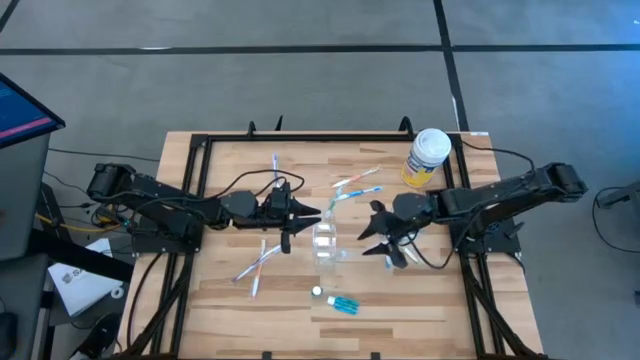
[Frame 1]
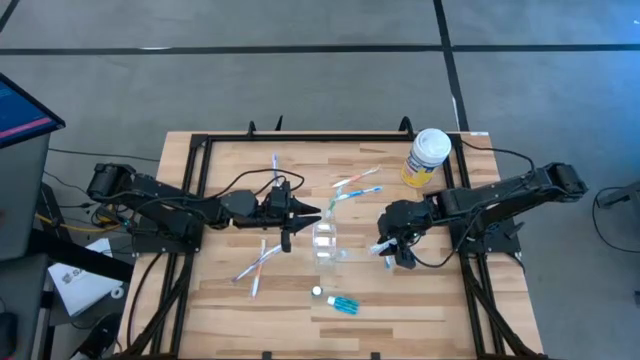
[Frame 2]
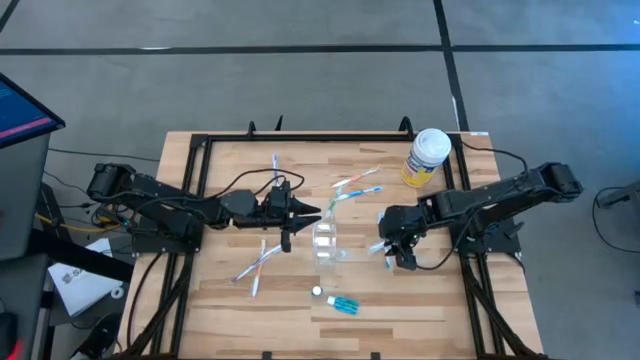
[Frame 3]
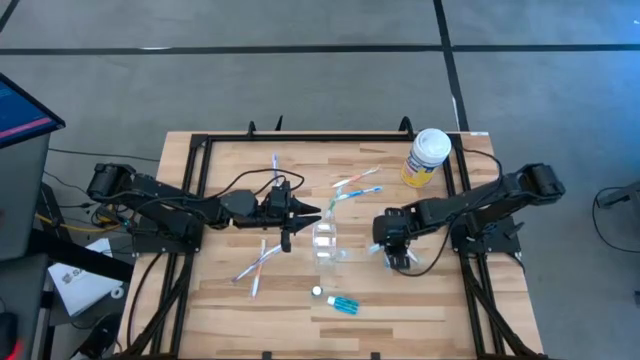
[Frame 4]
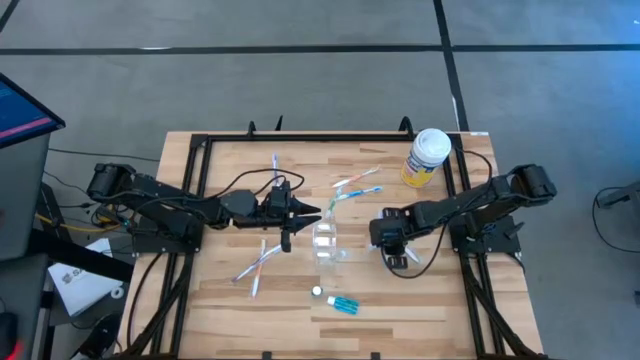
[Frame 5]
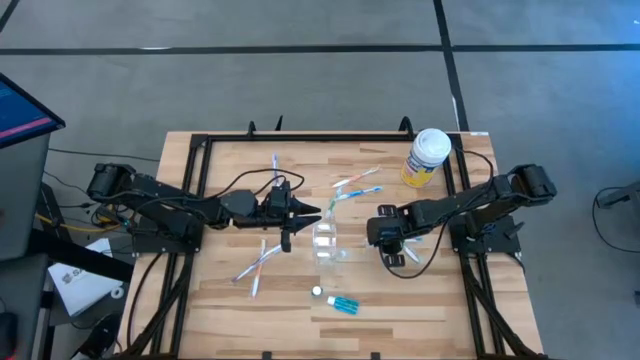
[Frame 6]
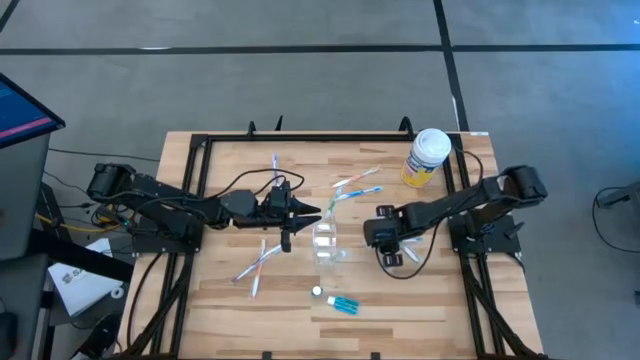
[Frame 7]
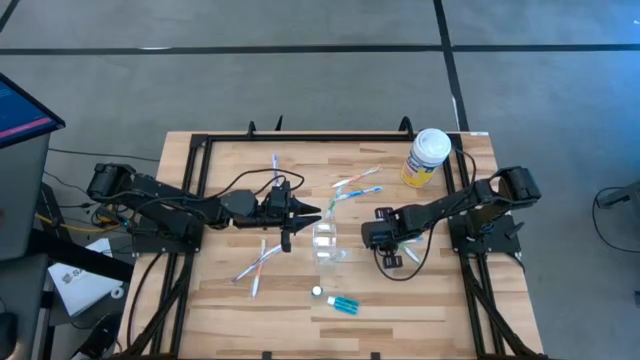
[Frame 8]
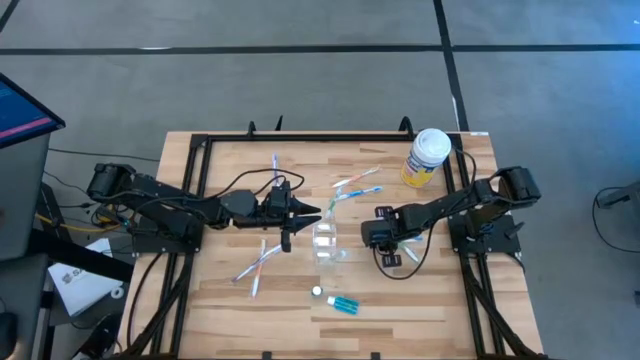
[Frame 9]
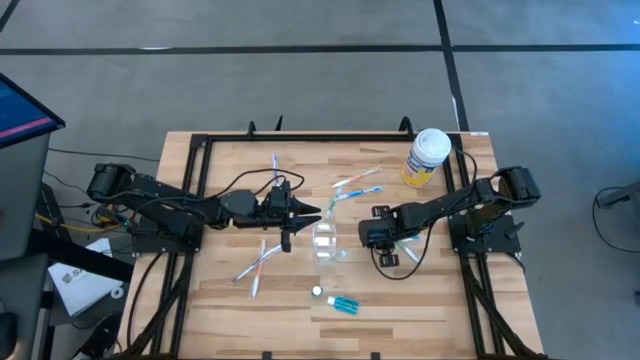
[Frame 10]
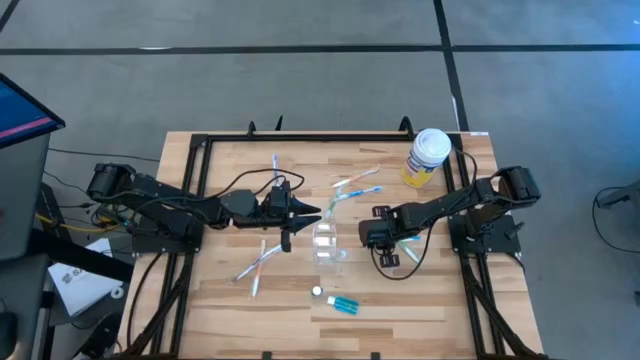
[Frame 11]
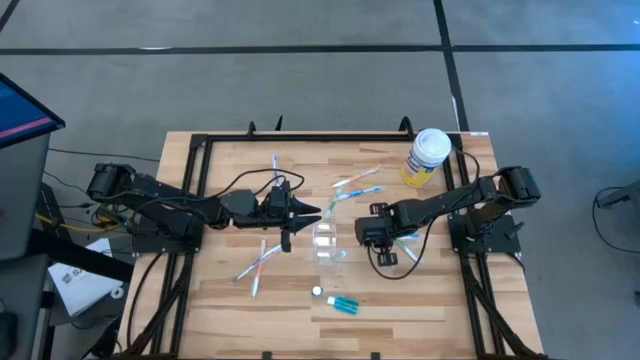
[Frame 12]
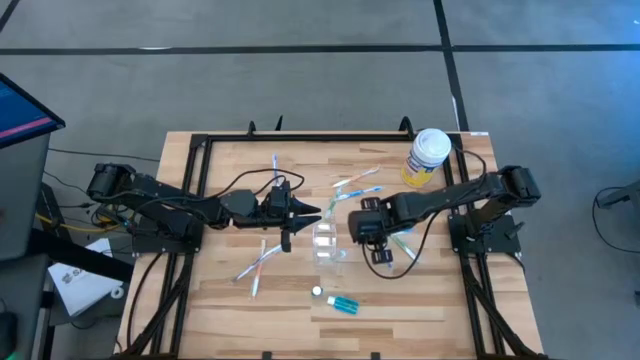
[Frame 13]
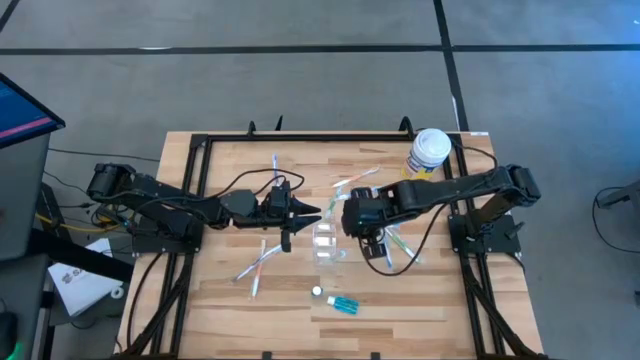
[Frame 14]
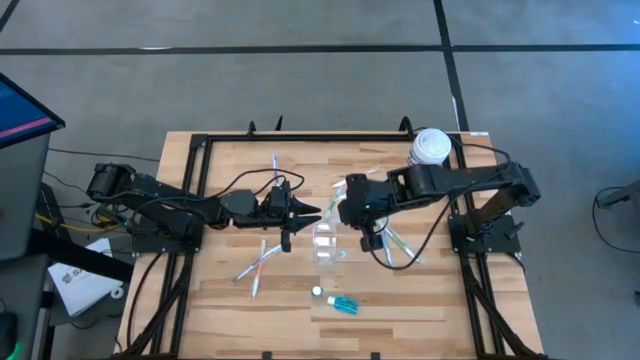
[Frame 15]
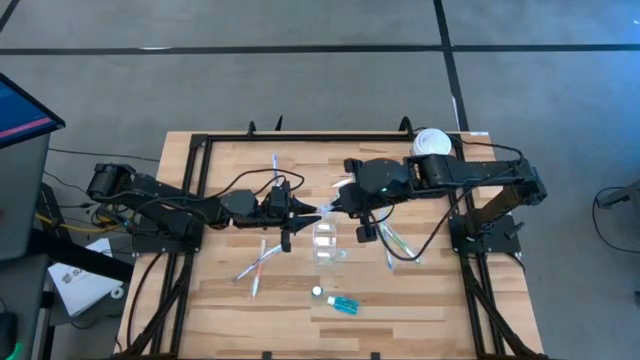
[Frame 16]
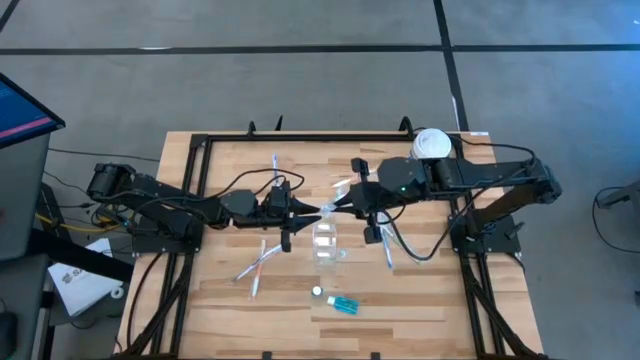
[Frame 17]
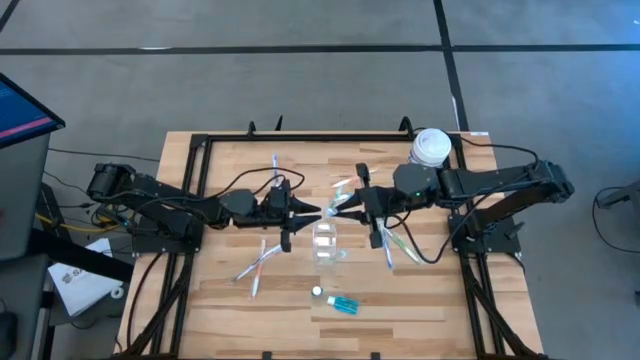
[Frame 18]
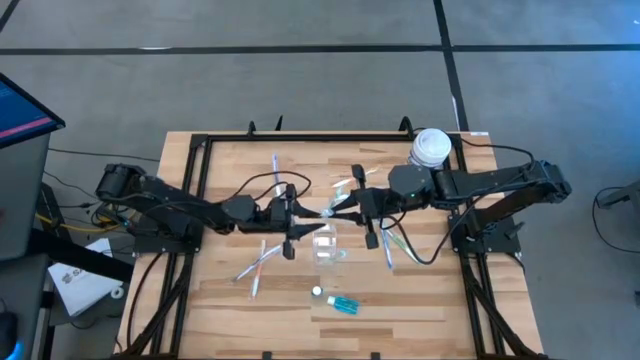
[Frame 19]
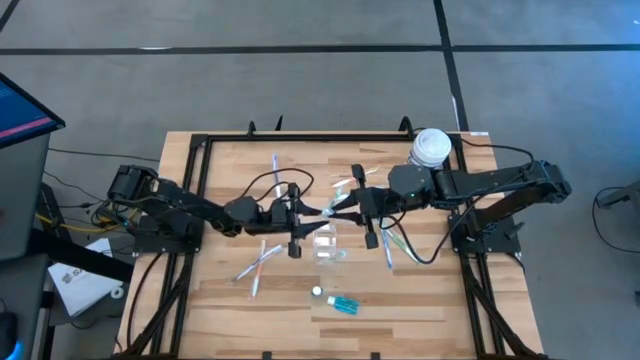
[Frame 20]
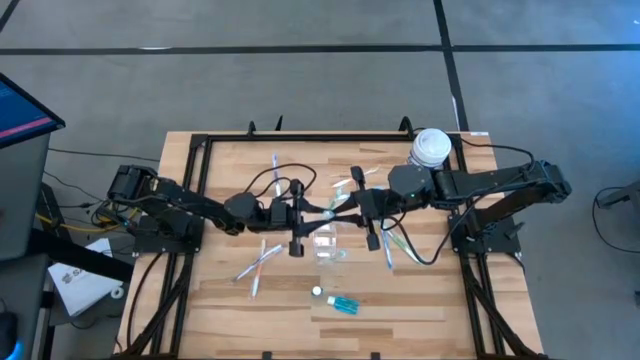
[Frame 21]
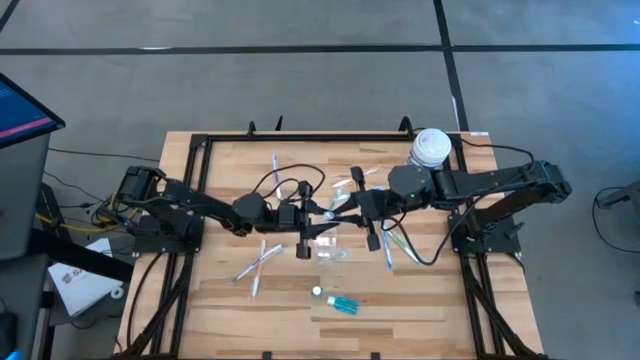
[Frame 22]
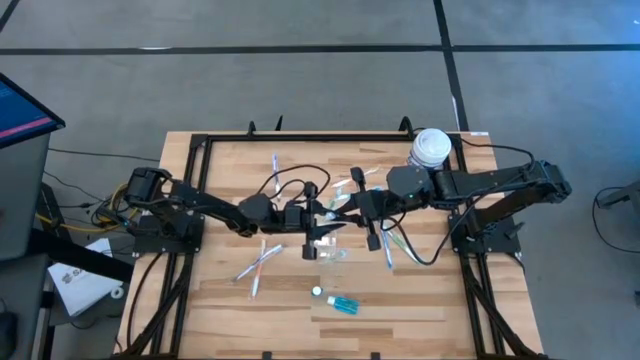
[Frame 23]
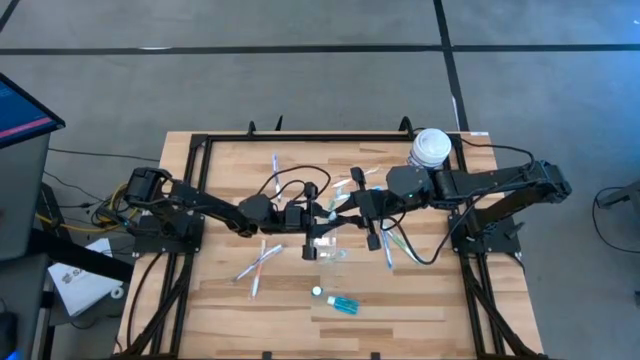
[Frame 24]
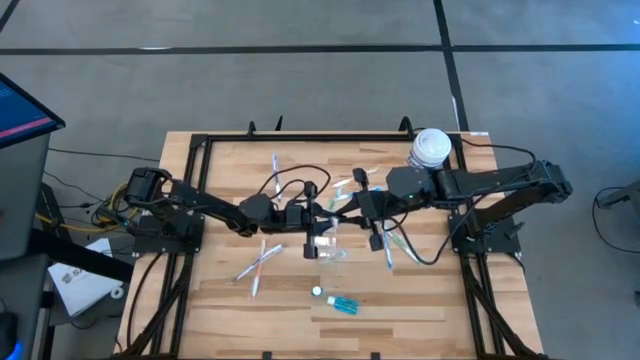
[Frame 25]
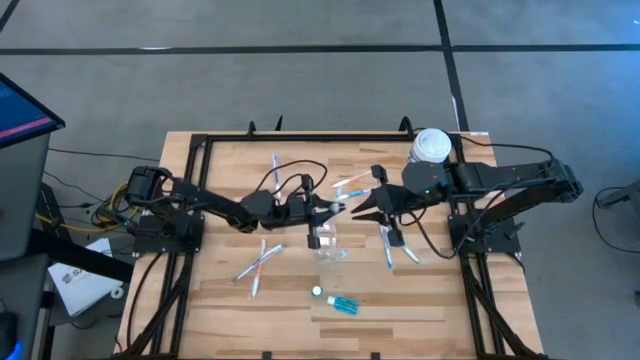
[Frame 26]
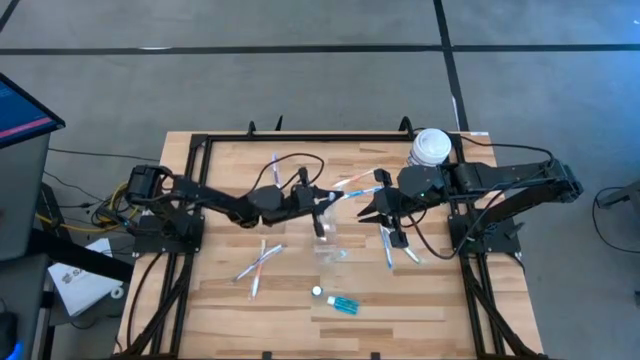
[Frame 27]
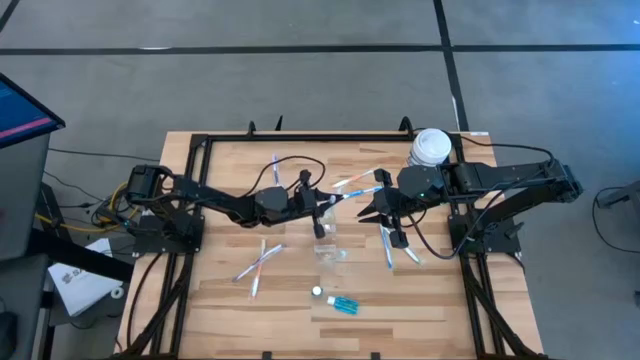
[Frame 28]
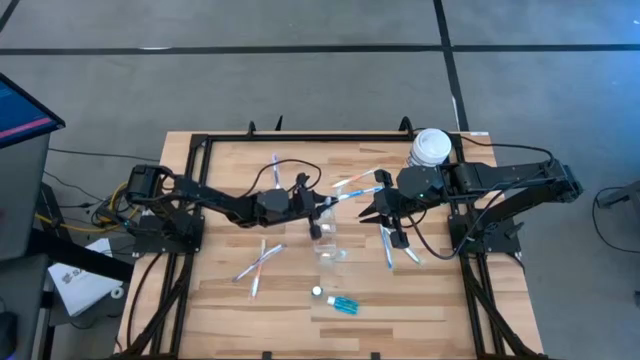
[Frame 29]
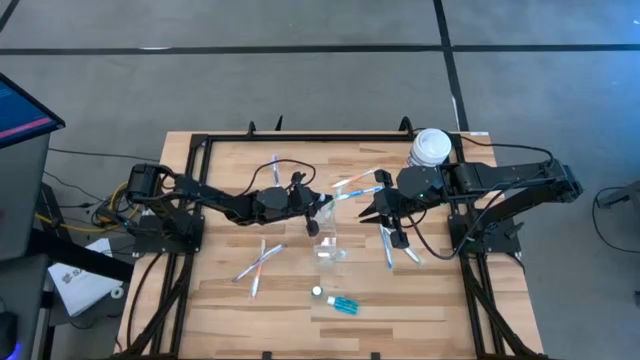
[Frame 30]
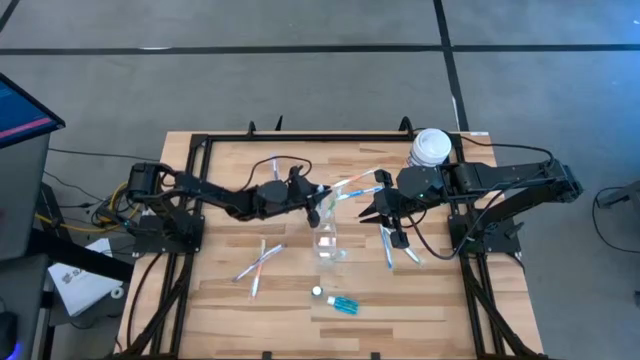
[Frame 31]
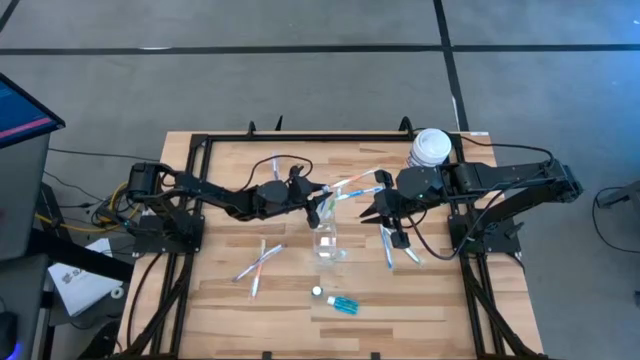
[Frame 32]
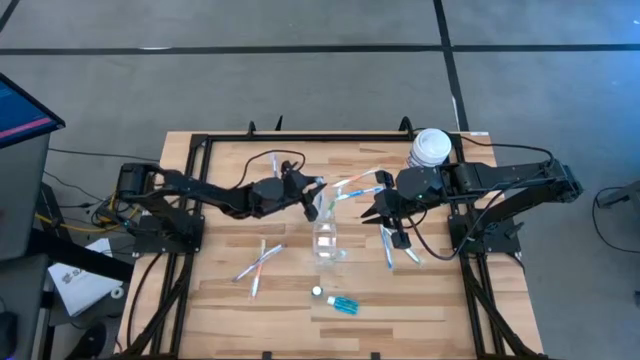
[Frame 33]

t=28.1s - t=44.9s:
Task: Pick & Place toothbrushing station
Put the bottom right blue toothbrush into the transparent organizer

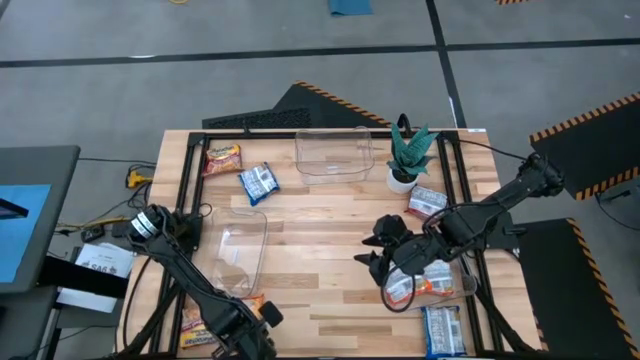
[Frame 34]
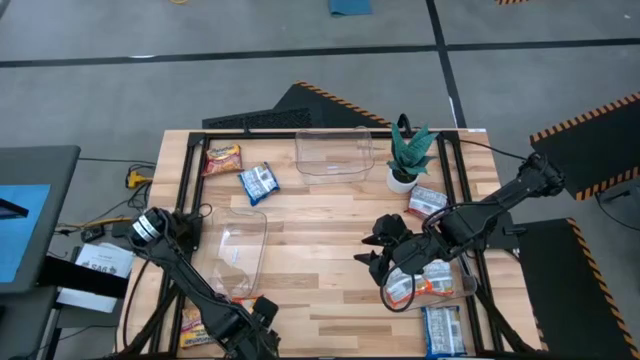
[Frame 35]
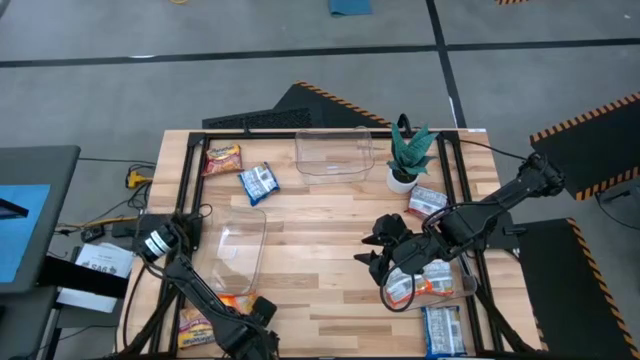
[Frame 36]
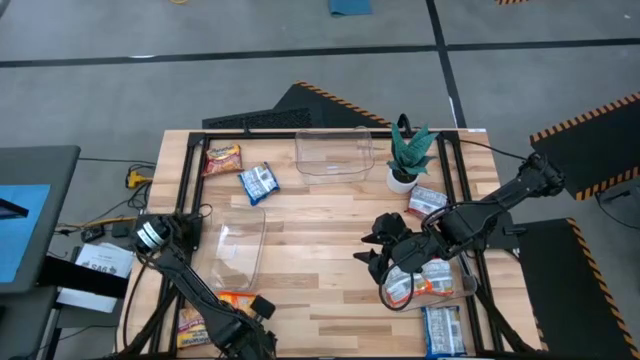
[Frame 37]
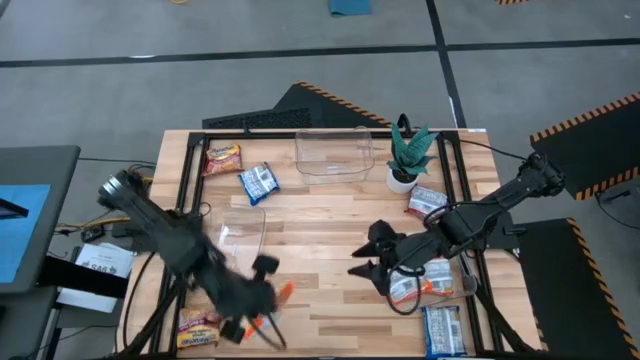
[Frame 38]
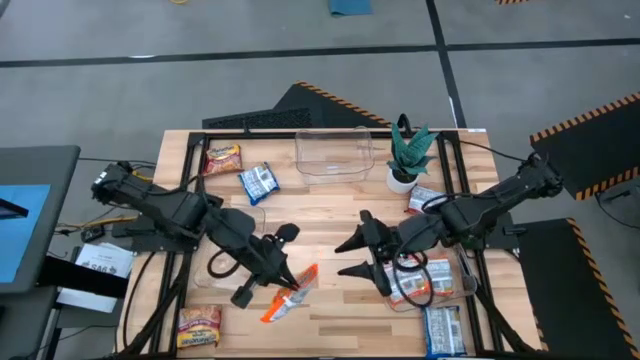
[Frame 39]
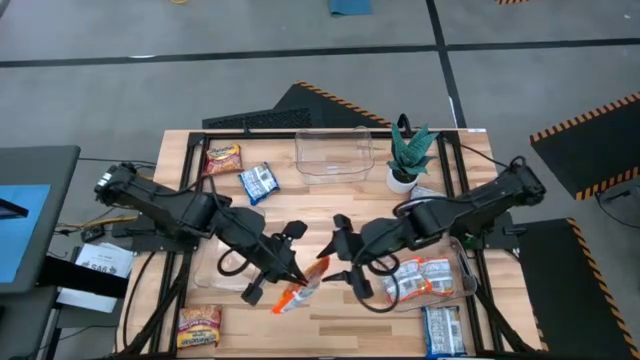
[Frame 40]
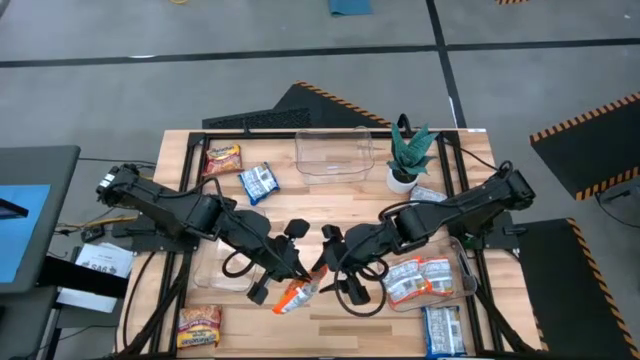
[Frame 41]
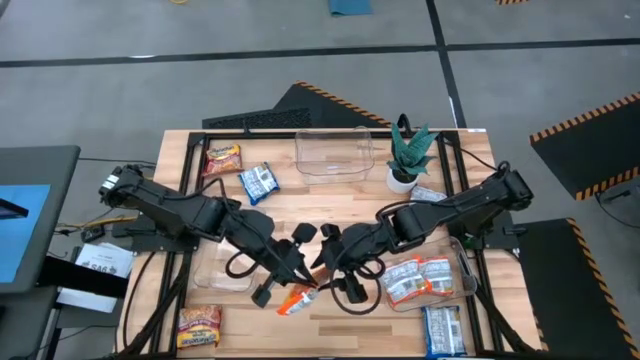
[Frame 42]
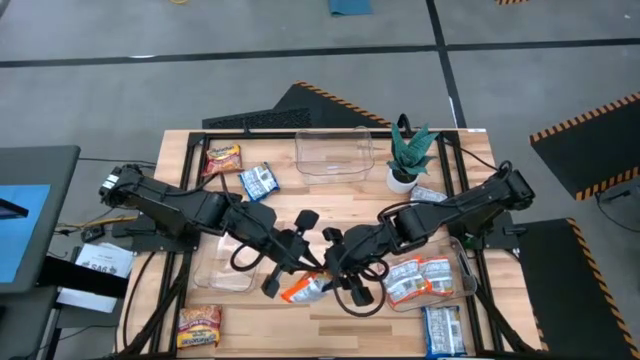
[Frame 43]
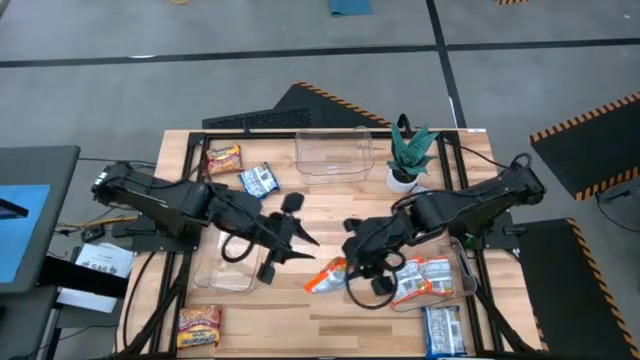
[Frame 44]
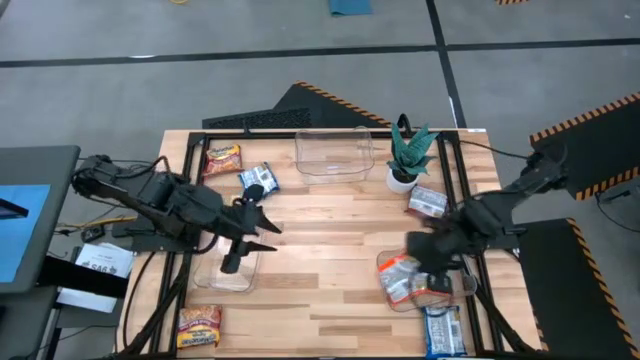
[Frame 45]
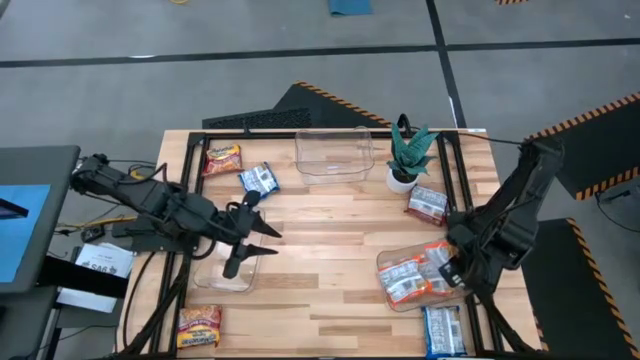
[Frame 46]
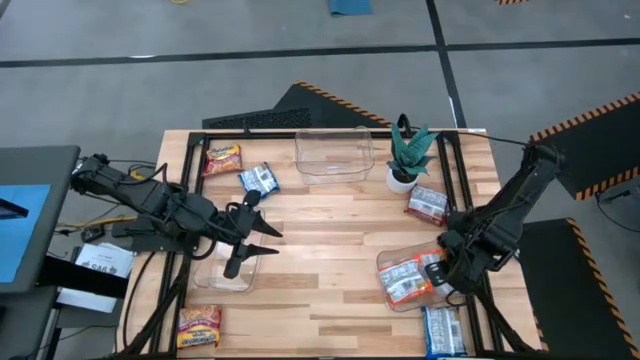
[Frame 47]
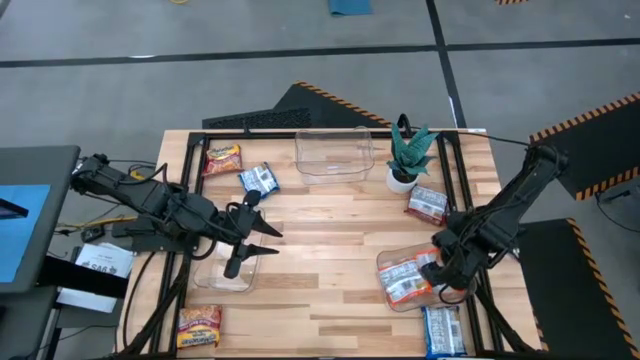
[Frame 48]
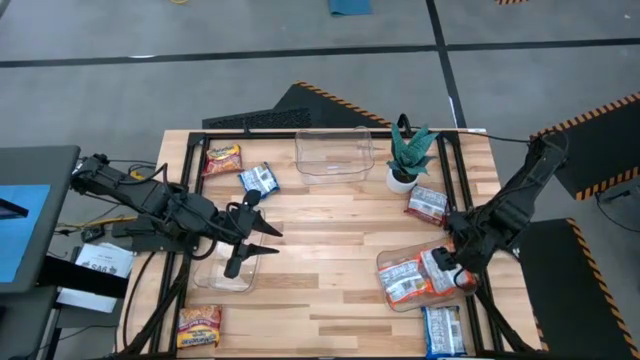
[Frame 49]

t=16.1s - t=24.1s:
Task: Sort Maruchan noodles
Put the orange noodle pack into the bottom right transparent bin
